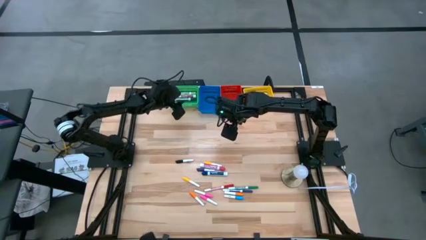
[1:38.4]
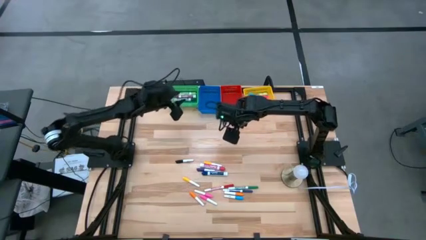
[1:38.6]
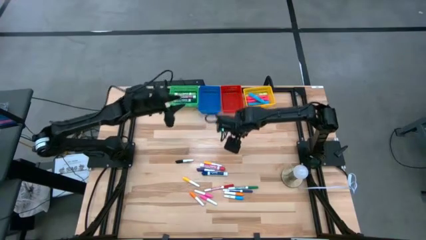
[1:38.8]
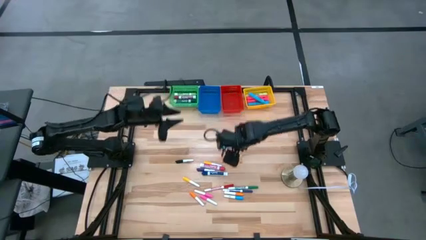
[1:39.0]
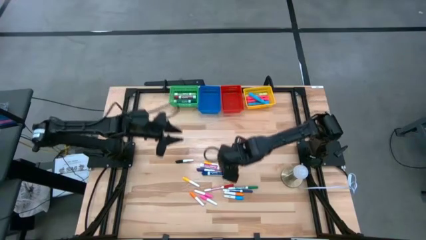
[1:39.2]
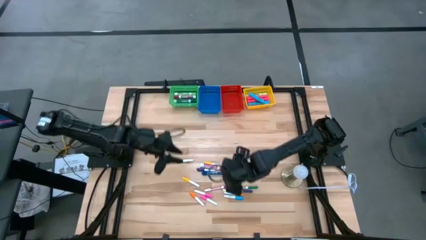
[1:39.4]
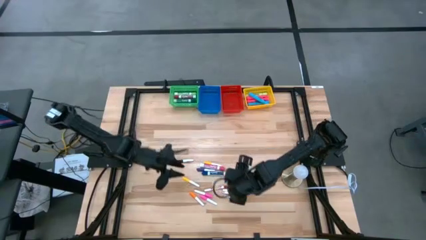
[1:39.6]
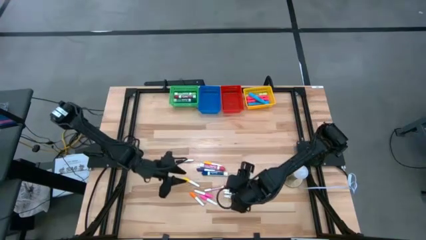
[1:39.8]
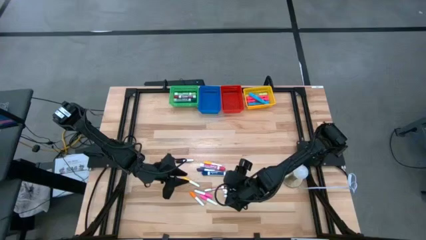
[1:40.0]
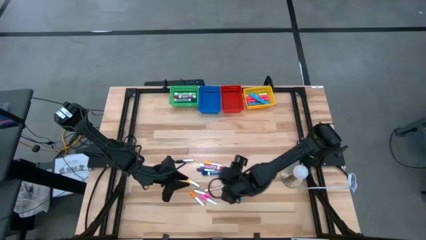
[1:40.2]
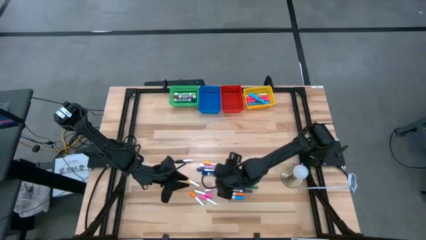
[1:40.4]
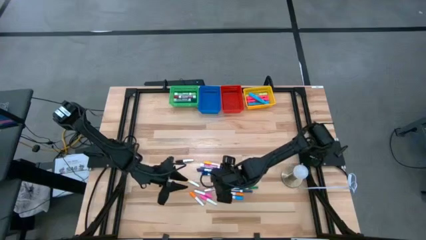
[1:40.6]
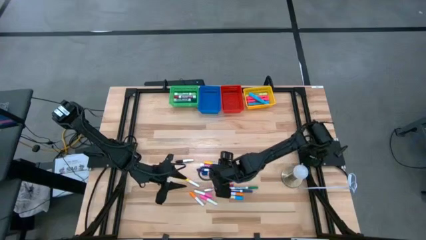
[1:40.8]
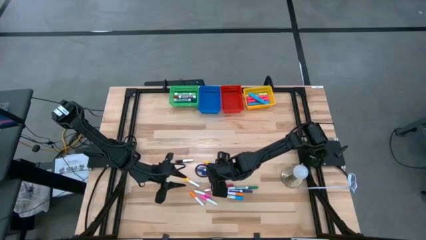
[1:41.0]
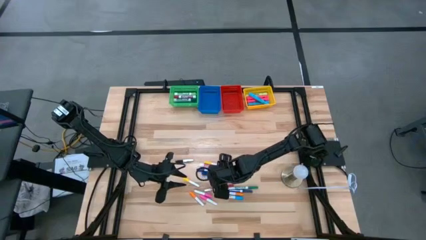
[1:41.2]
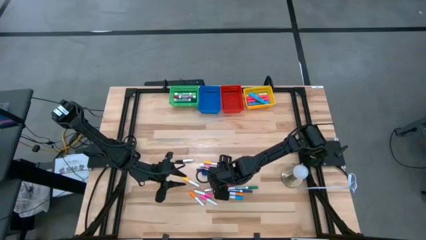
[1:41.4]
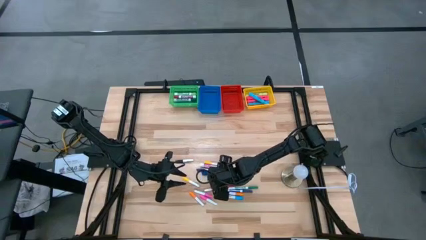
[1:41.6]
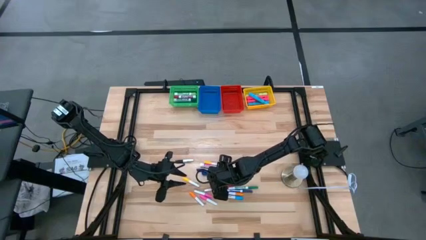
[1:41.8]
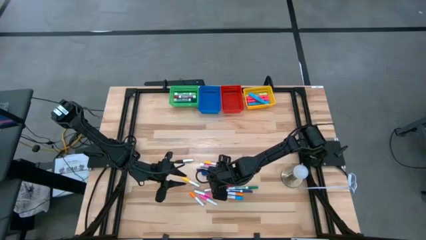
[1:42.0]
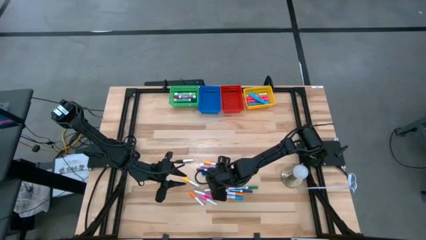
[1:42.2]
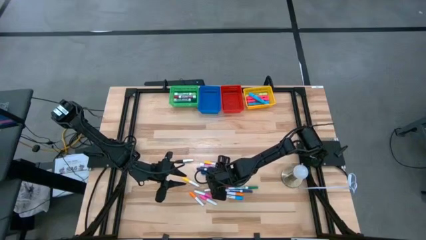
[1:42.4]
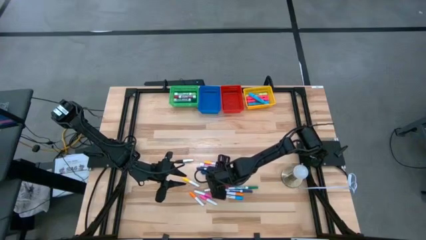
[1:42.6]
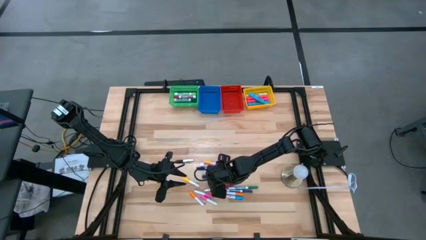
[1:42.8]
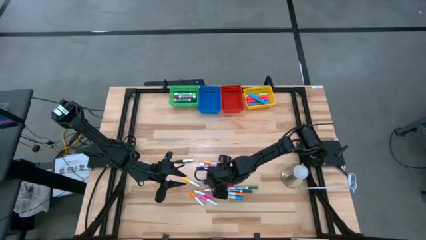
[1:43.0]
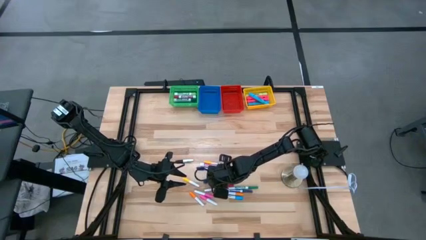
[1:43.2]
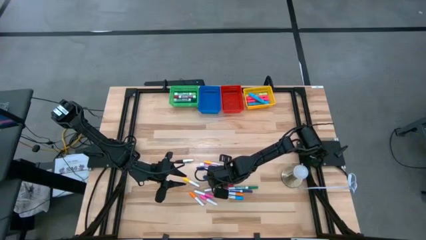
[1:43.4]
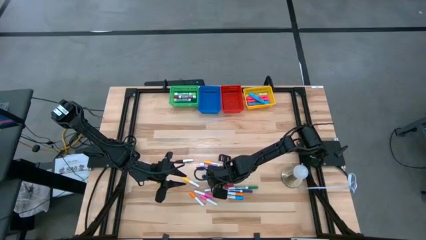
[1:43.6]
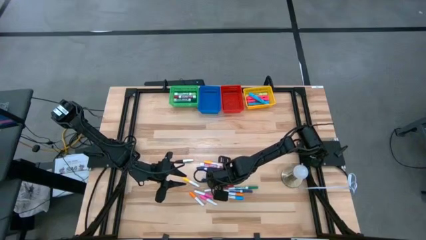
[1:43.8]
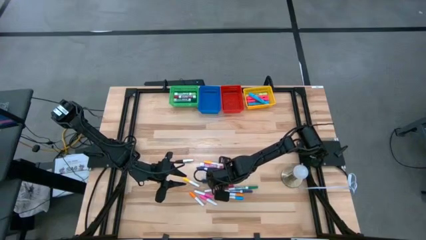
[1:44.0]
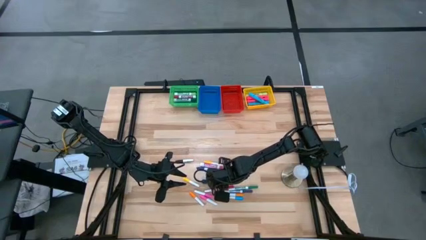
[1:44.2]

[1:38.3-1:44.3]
Task: Pick & Place Markers
Put the large dark blue marker pen into the green bin

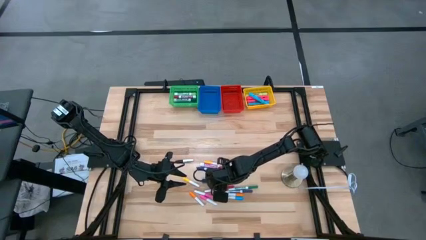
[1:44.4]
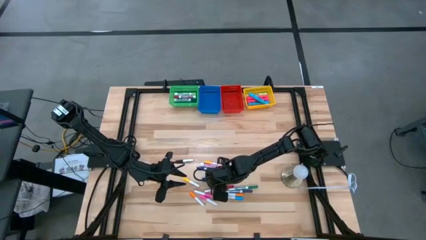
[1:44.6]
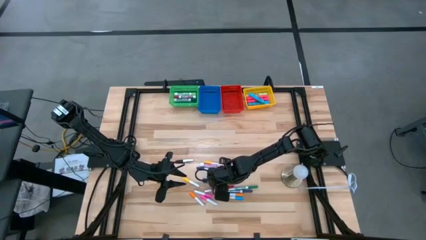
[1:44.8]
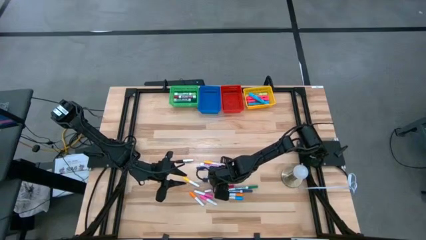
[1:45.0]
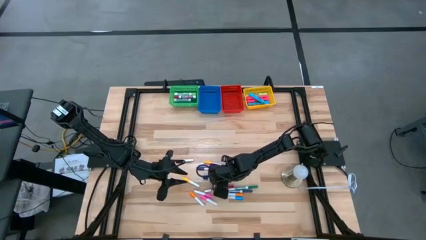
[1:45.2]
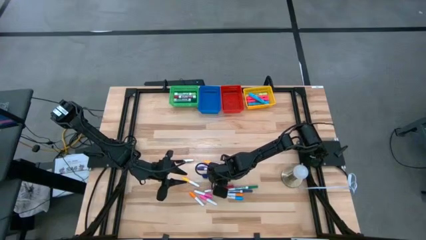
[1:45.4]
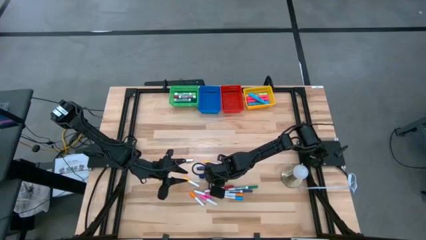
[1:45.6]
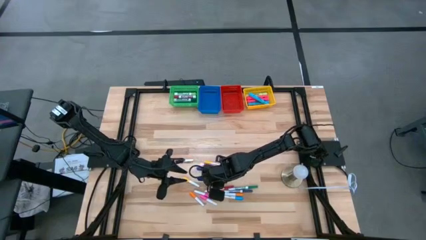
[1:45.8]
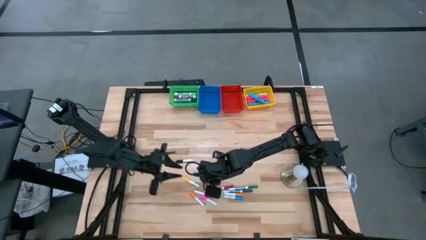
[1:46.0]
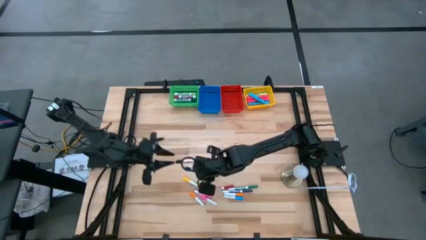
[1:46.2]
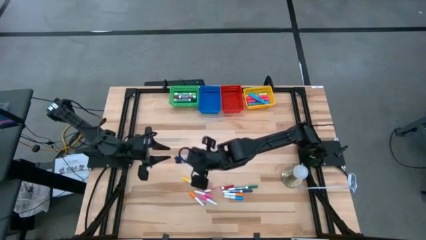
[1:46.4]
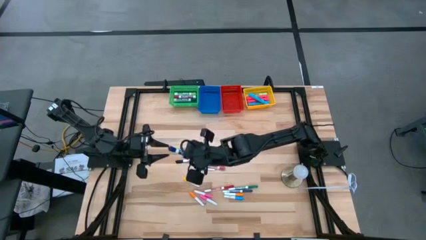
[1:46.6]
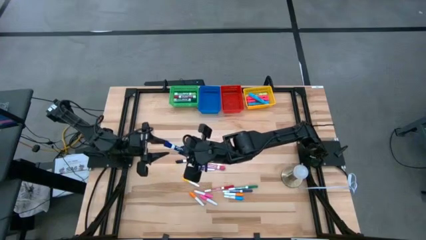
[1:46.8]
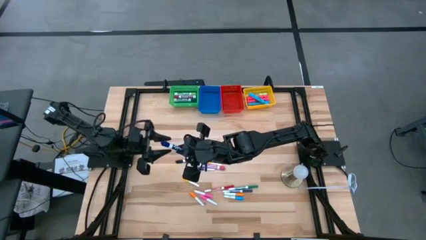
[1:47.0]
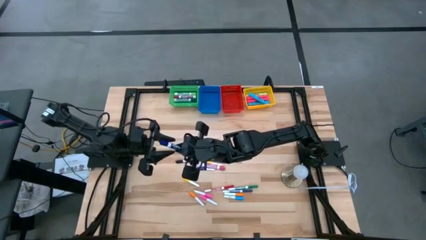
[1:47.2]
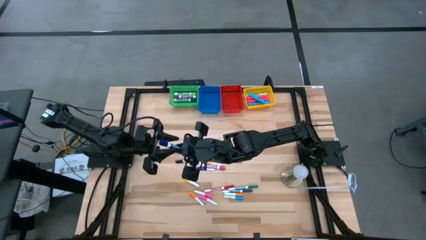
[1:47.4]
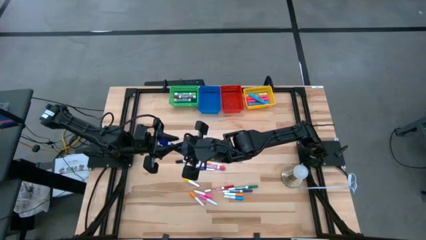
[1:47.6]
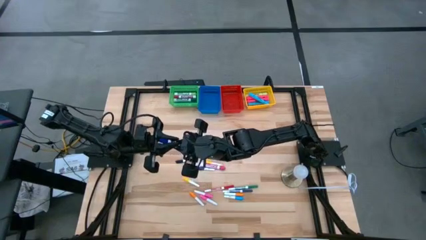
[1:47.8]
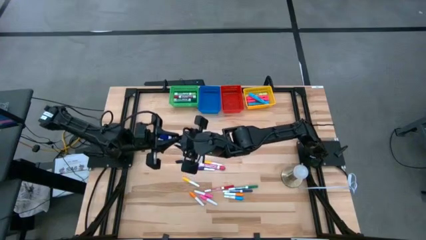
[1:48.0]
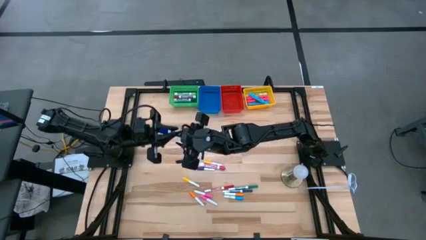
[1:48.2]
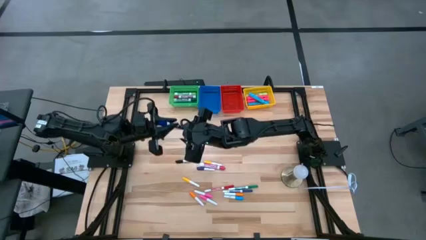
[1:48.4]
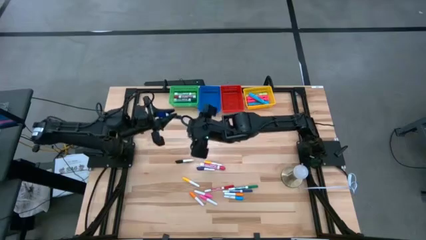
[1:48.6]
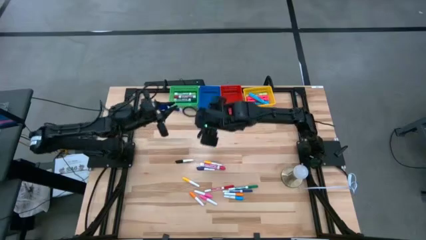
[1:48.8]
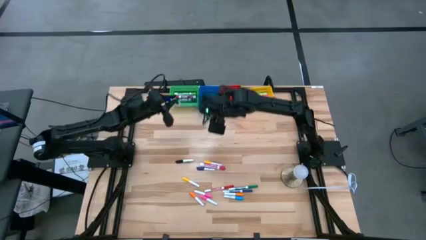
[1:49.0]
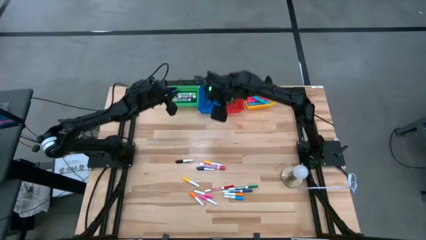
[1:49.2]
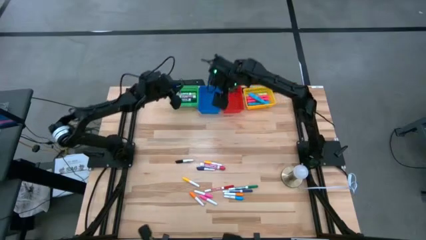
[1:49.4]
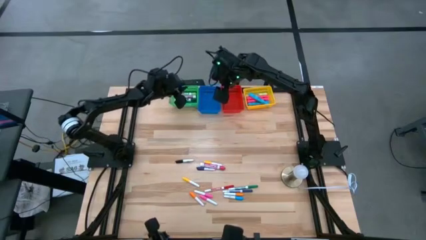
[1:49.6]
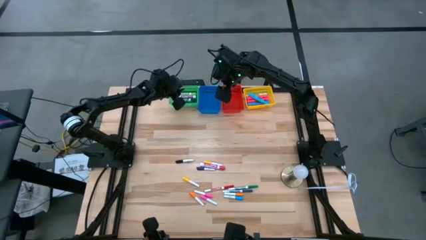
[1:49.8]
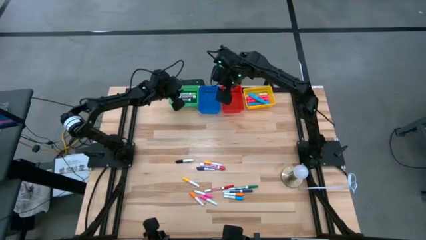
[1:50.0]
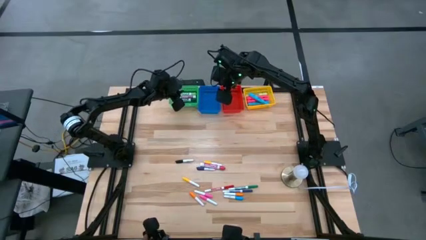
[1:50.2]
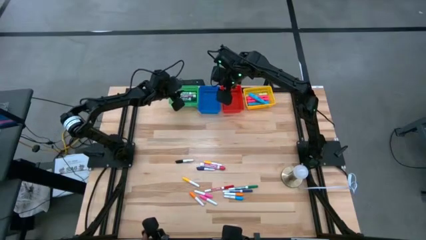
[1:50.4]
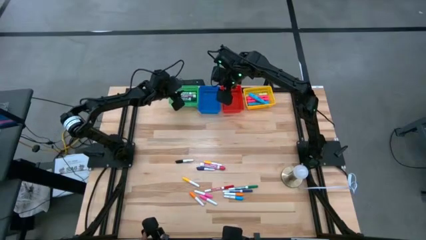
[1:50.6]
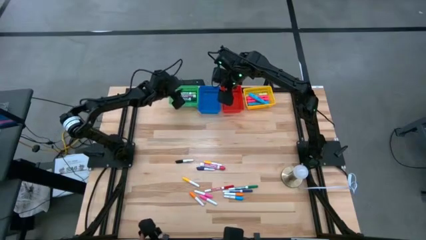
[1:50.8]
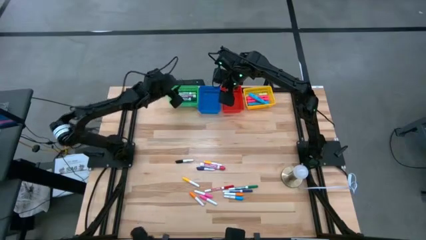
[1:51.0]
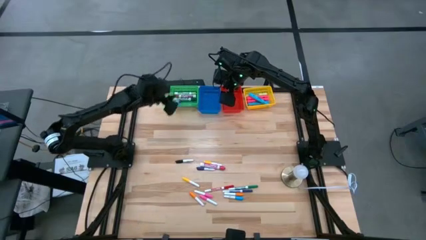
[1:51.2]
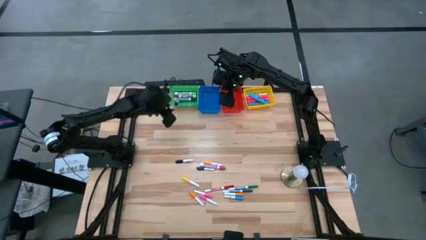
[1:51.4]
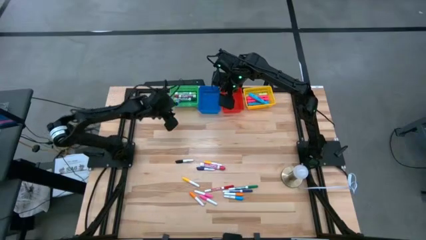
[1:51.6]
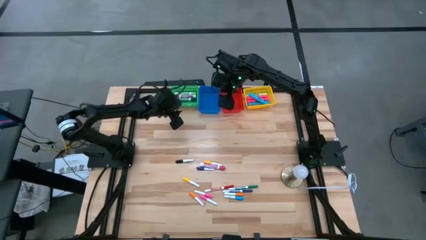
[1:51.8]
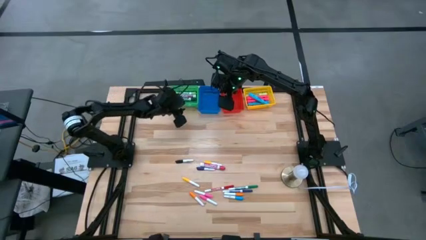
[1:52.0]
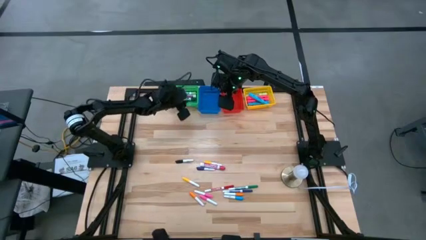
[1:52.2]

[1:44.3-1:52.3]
Put the large dark blue marker pen into the green bin

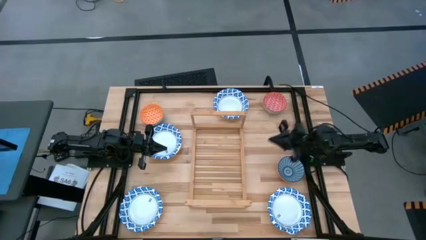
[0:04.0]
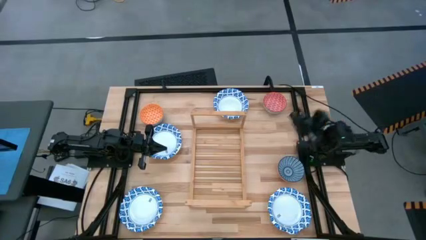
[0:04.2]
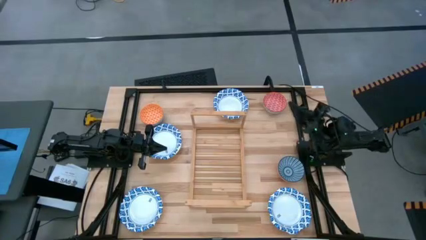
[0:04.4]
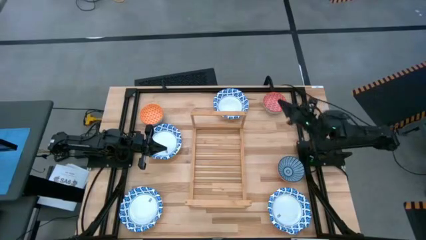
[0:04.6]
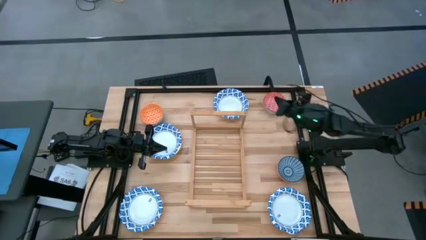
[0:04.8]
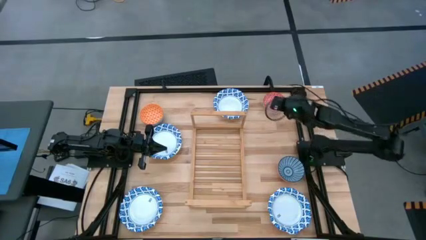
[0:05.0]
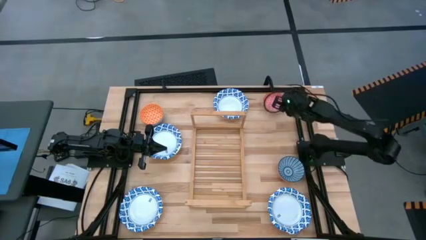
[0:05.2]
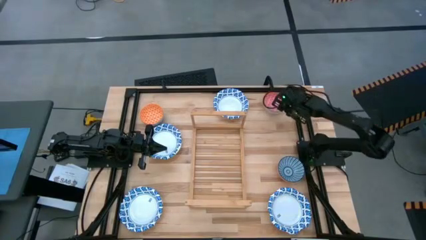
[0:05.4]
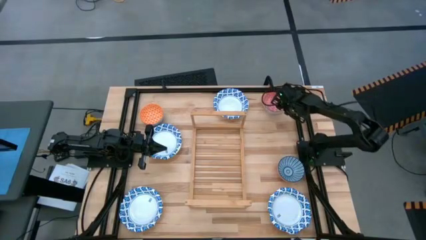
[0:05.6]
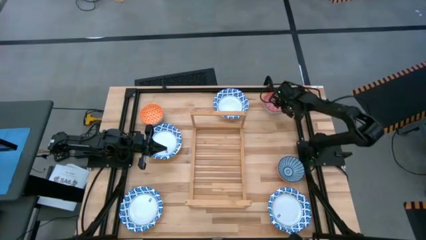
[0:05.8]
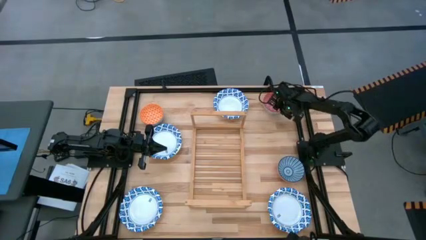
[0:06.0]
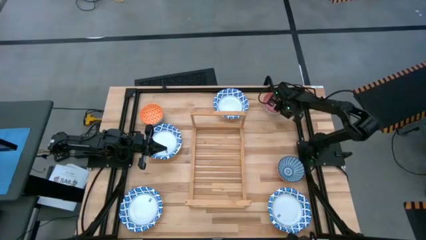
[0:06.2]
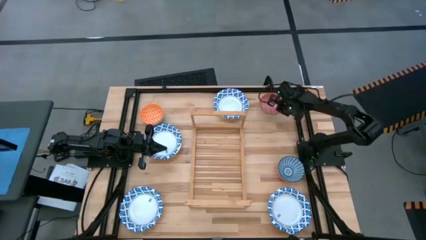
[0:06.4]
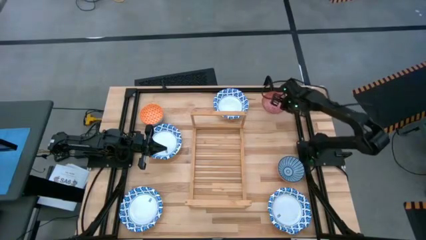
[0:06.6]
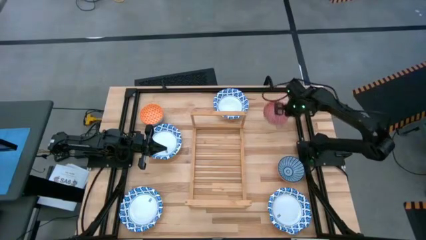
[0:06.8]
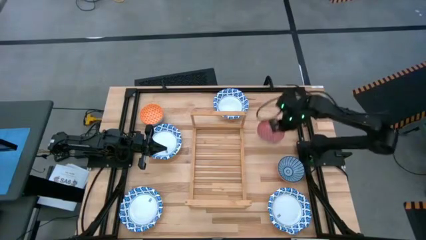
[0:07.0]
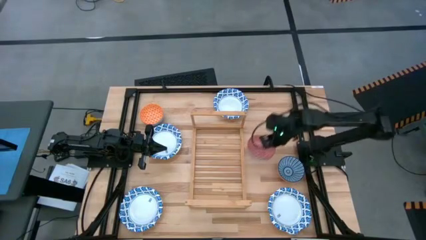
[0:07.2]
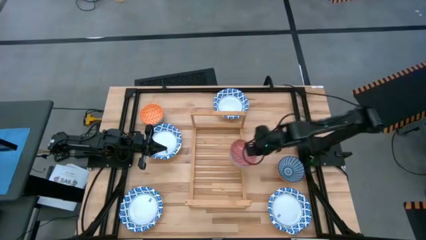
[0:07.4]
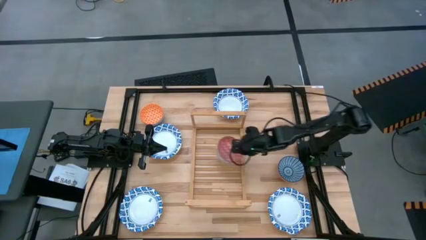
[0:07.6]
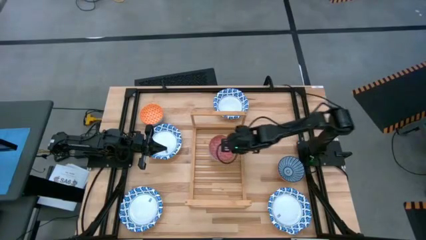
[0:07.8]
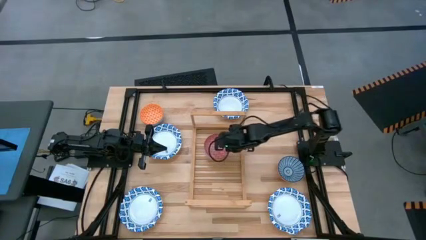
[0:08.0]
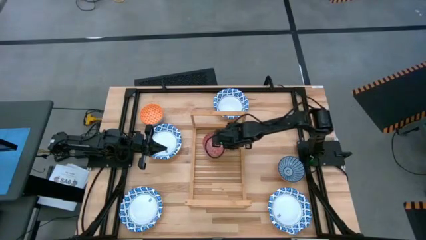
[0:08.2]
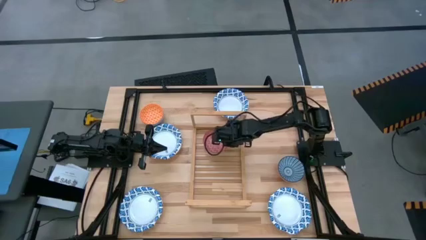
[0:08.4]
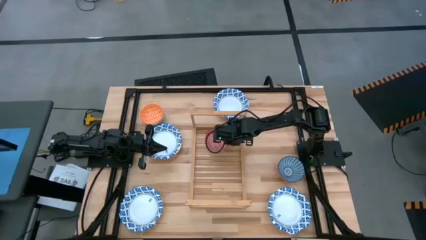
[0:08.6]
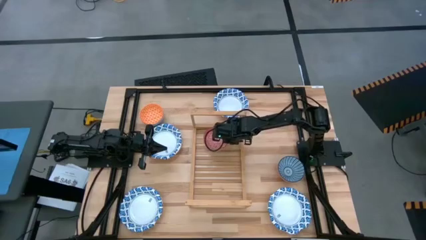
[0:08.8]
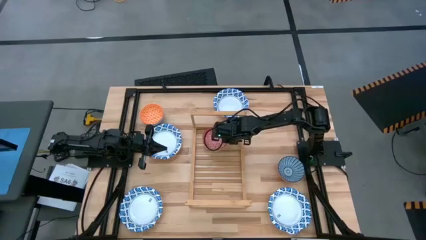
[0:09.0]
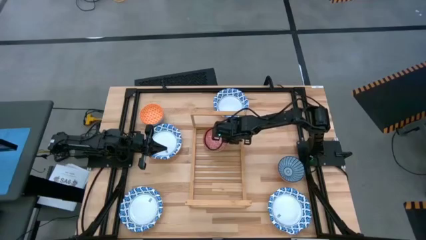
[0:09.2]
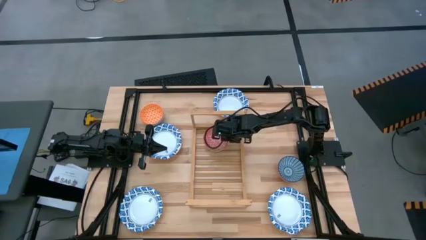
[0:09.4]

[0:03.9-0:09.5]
Task: Place and stack bowls onto a shelf
Put the red patterned bowl on the shelf
